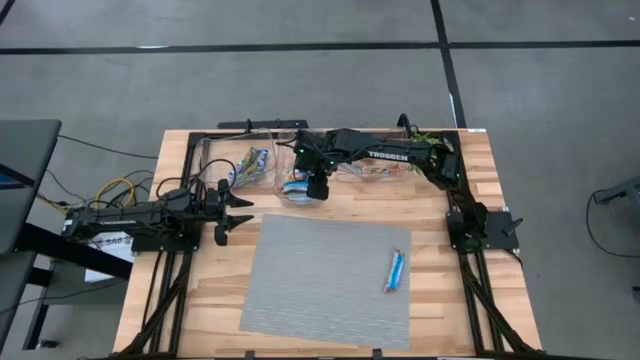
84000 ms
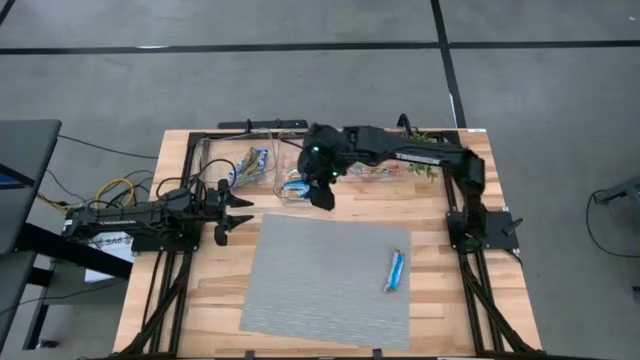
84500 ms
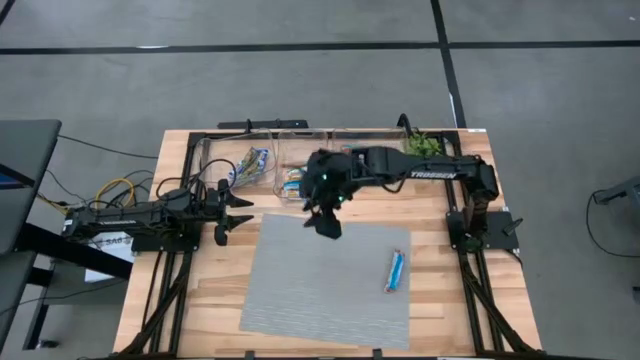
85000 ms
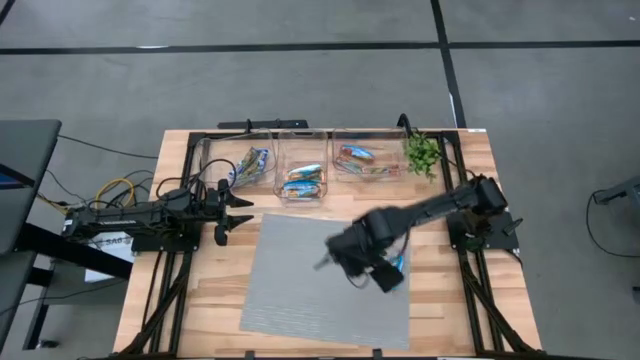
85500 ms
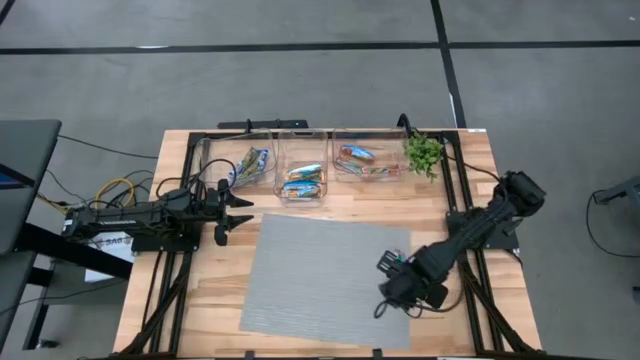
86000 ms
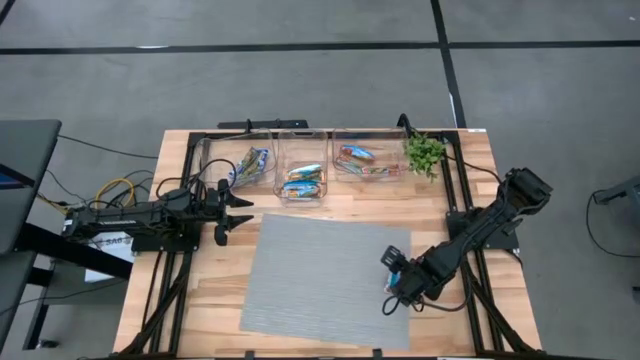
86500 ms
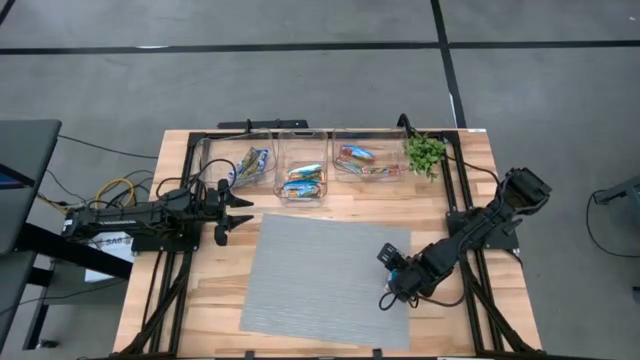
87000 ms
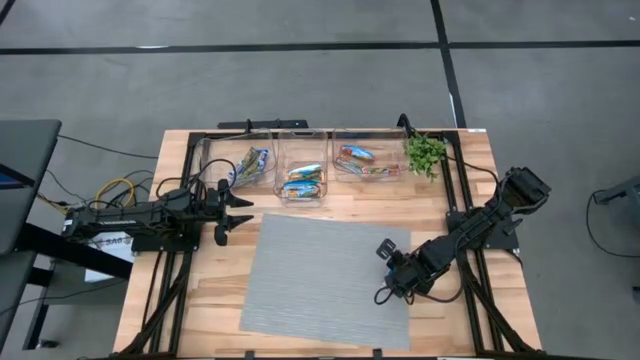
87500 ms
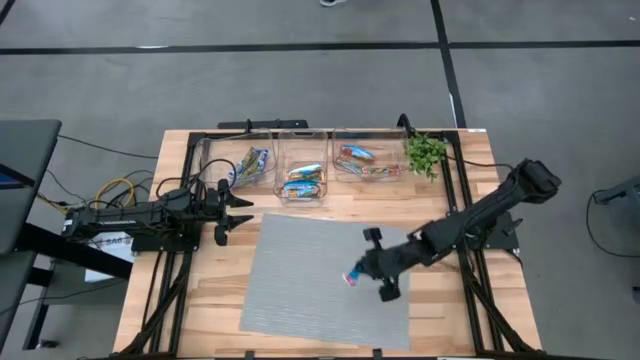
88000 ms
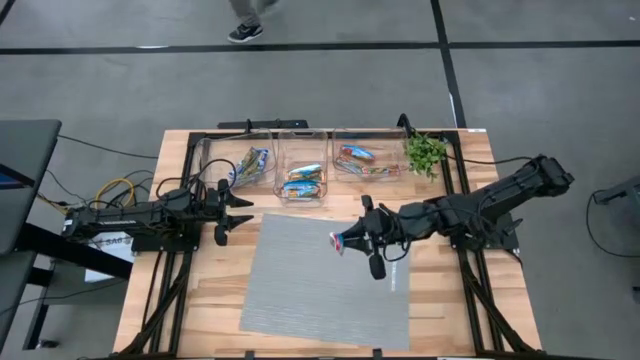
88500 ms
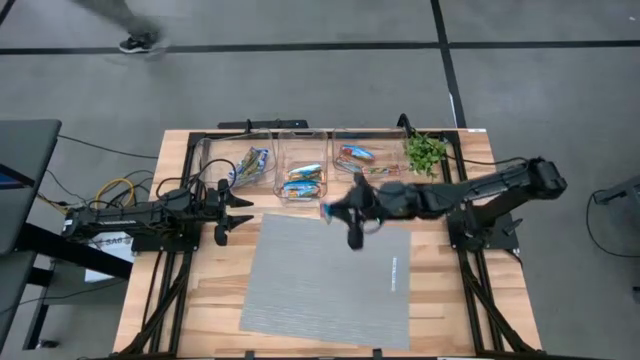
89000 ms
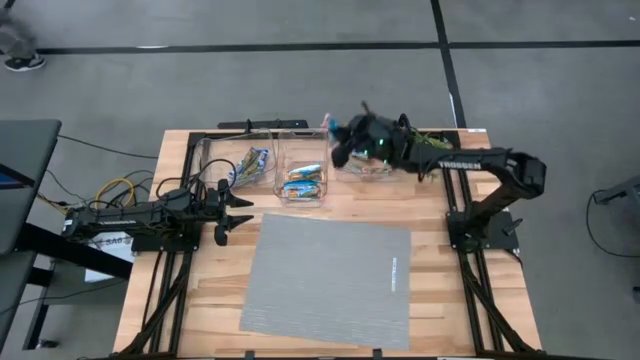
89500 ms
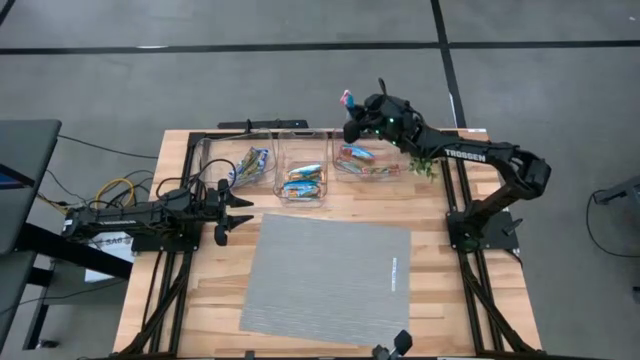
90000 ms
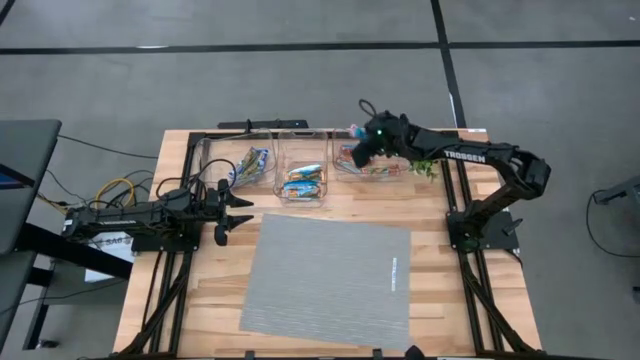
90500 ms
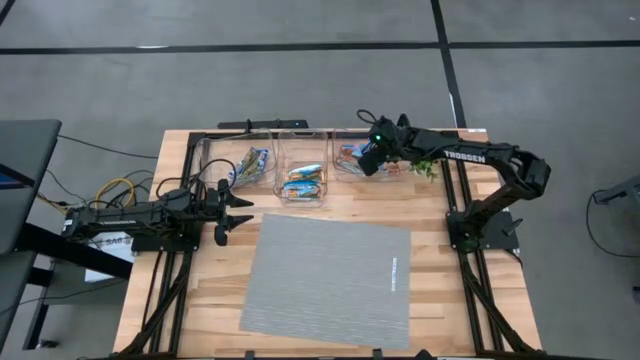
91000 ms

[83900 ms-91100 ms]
Task: Pick and place Granola Bars by type
Put the red granola bar into the right transparent bin

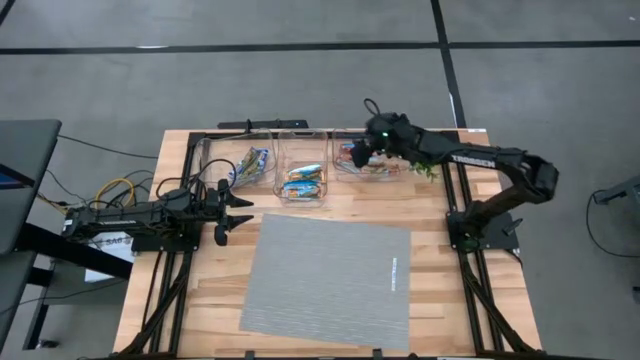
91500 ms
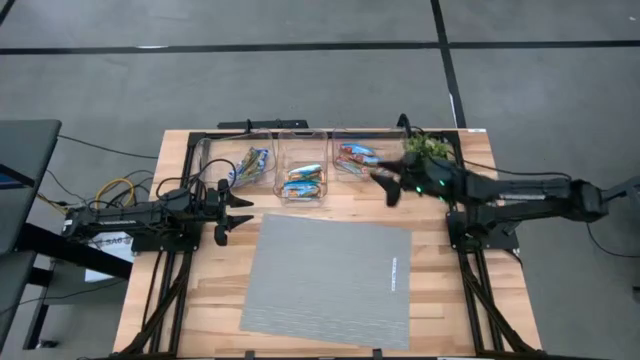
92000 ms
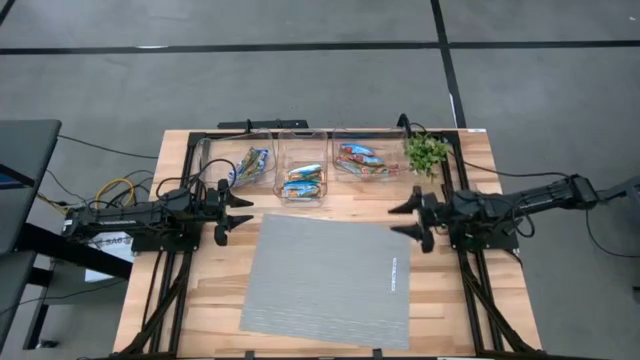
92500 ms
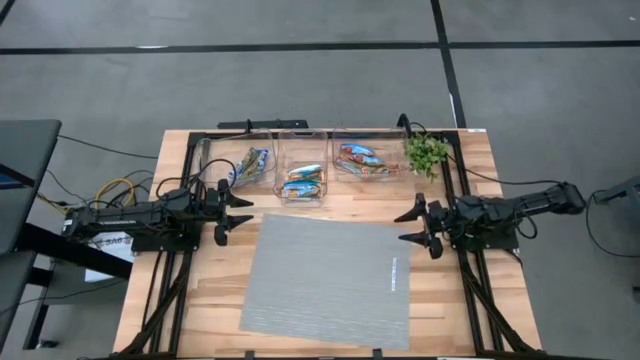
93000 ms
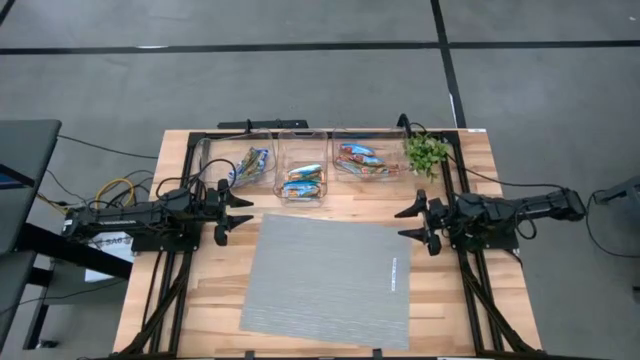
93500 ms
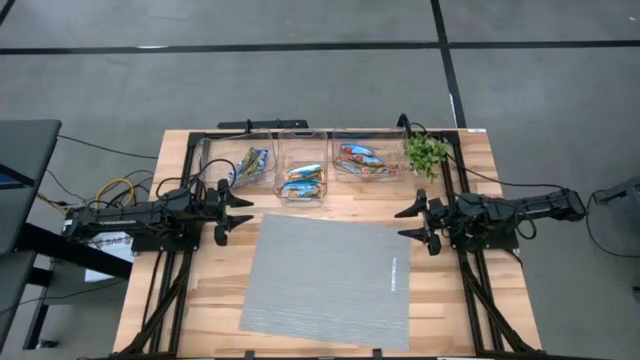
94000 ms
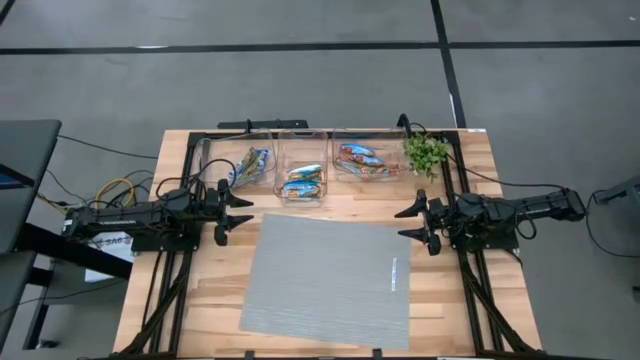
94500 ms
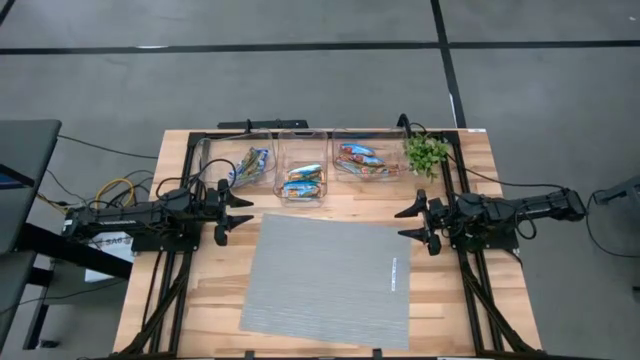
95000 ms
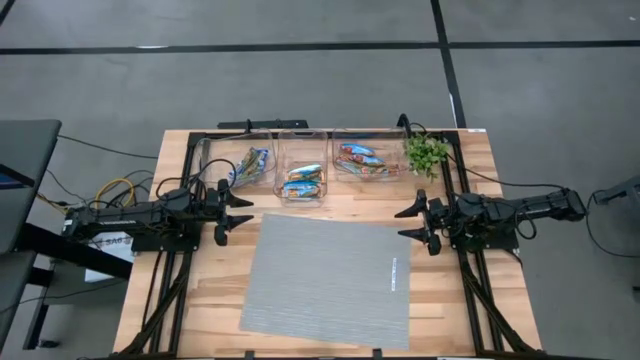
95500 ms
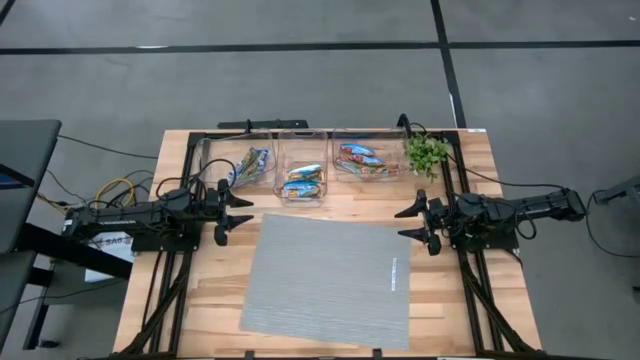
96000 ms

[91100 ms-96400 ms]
Return to Home Position

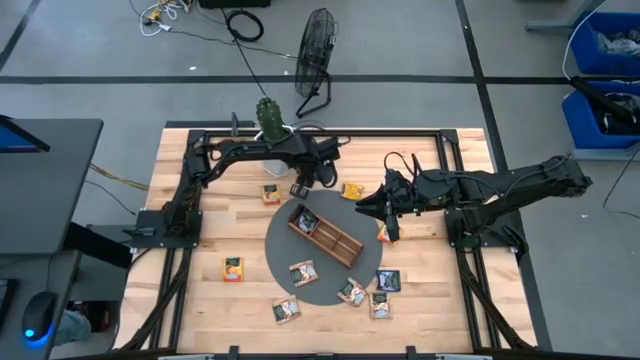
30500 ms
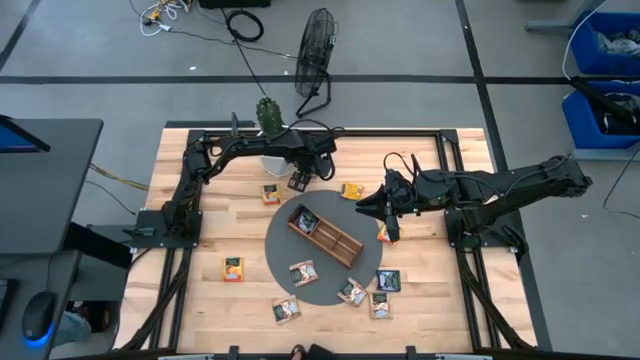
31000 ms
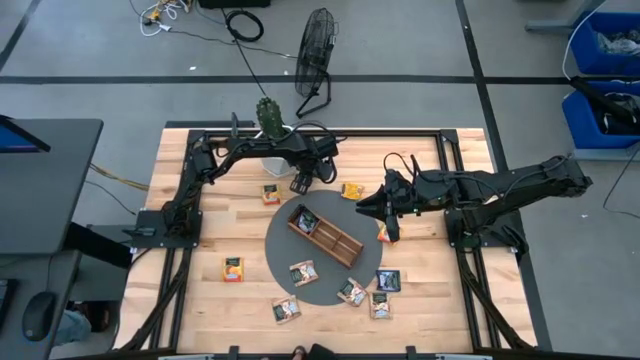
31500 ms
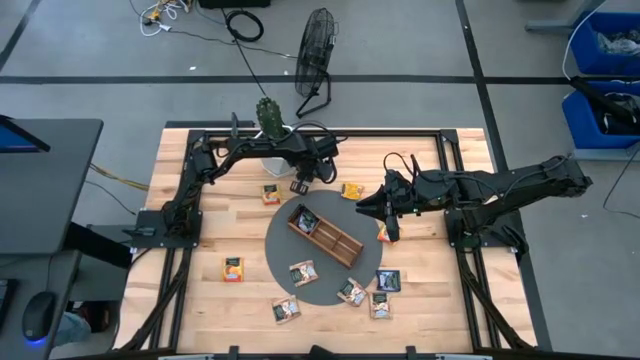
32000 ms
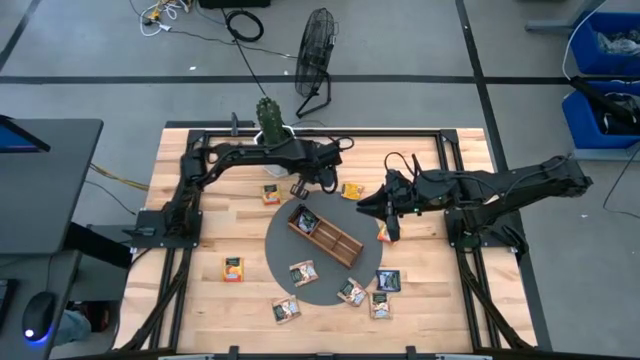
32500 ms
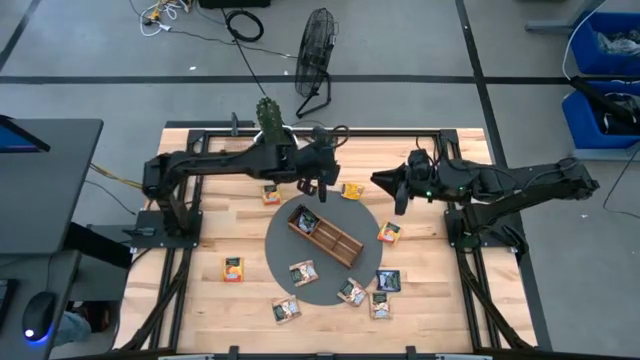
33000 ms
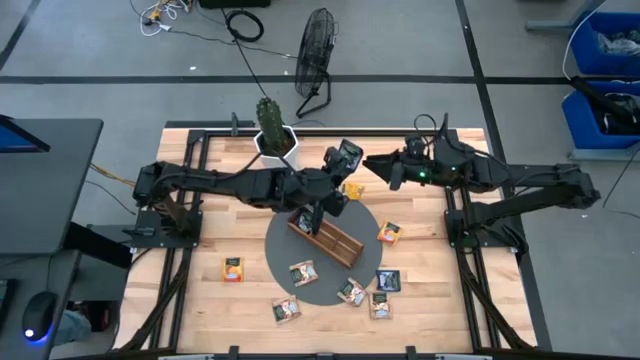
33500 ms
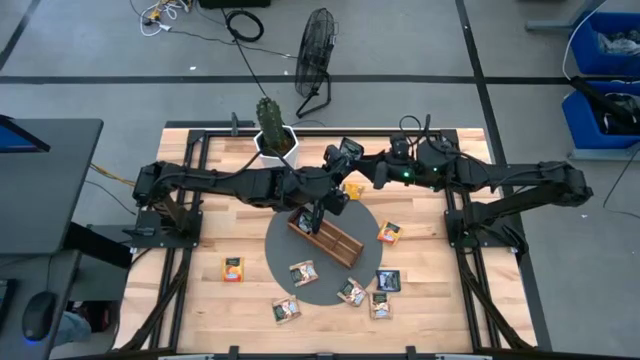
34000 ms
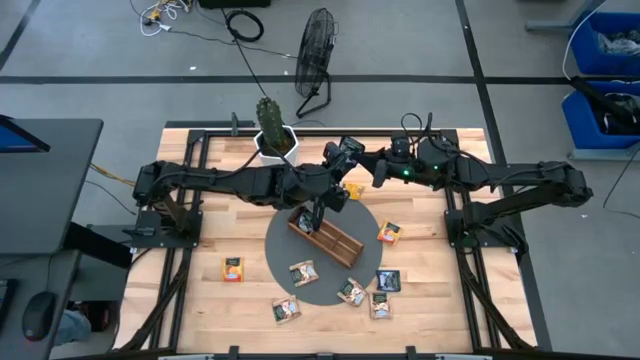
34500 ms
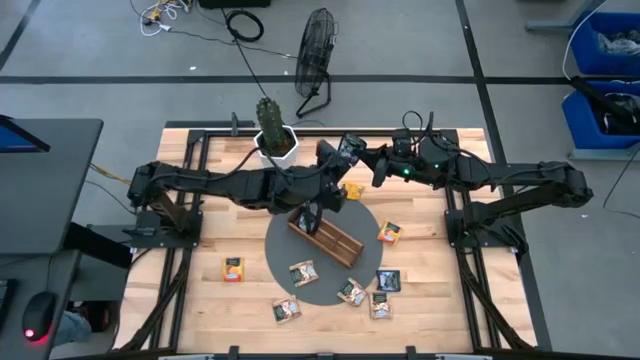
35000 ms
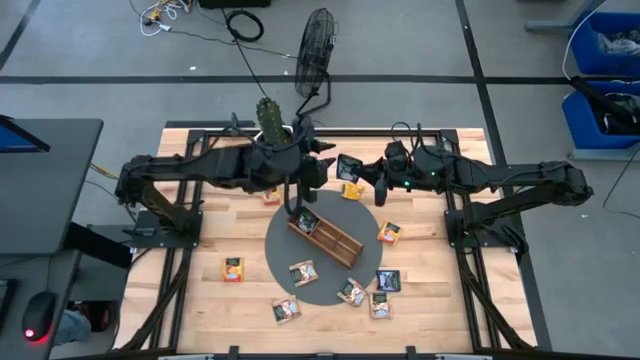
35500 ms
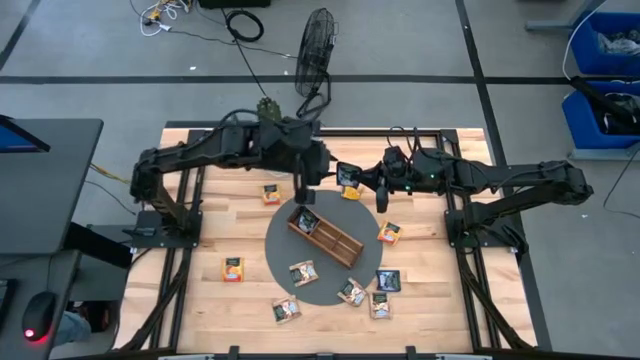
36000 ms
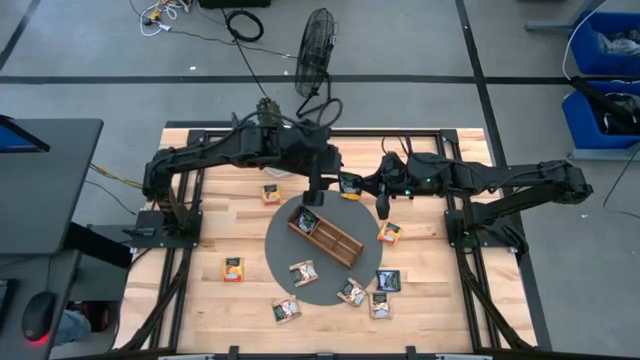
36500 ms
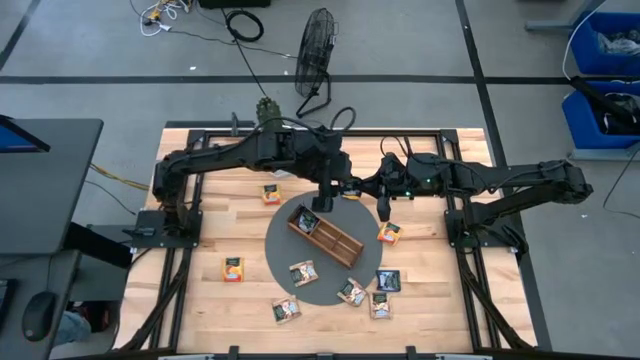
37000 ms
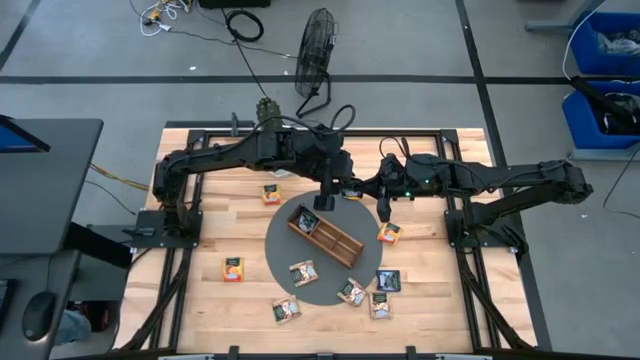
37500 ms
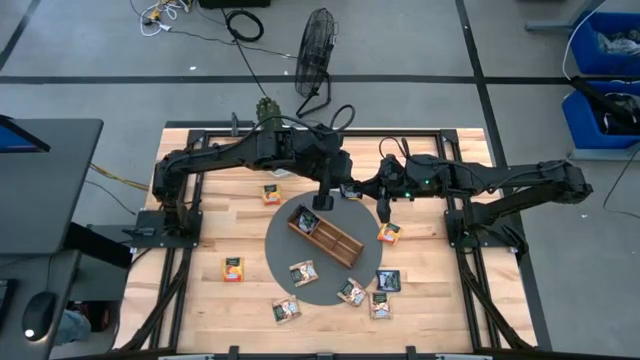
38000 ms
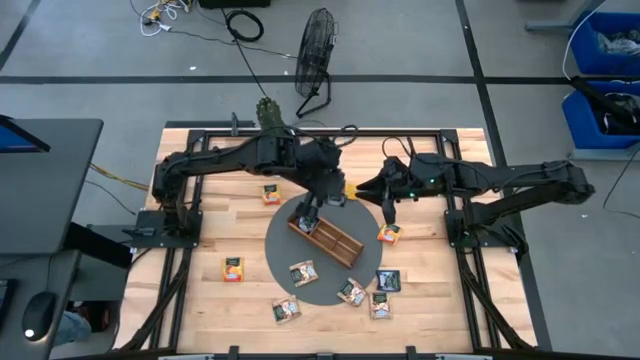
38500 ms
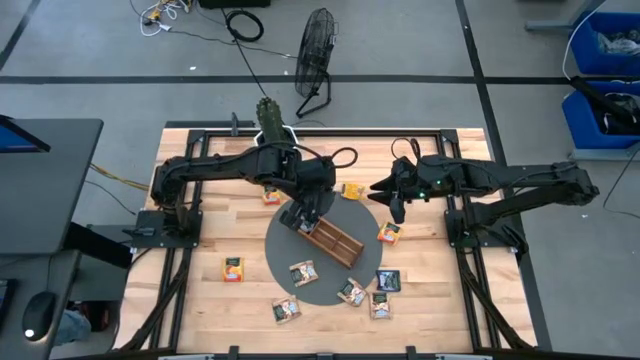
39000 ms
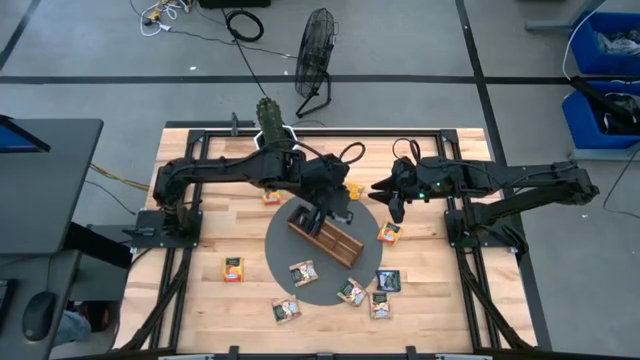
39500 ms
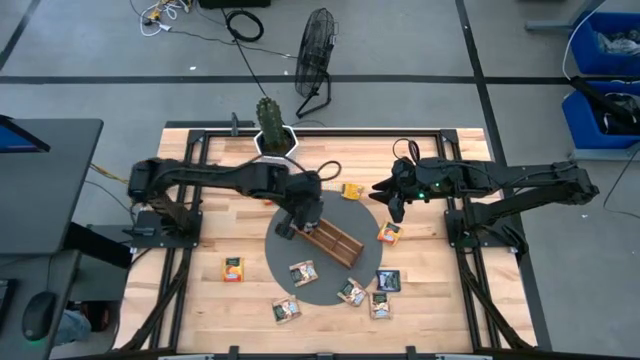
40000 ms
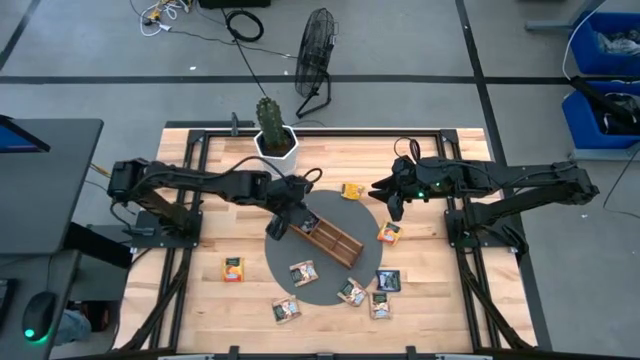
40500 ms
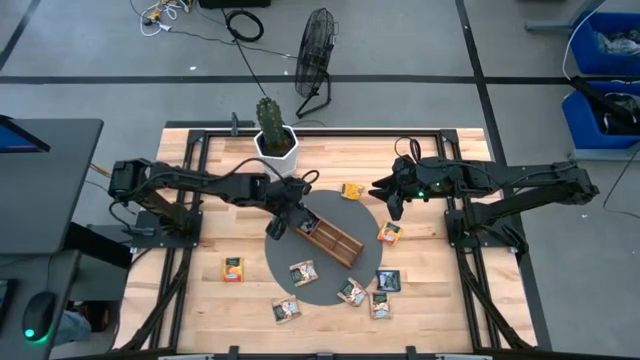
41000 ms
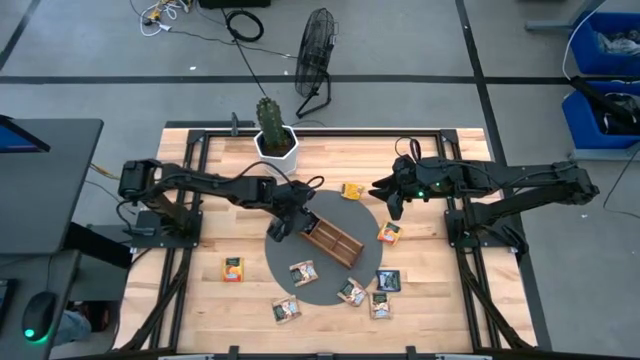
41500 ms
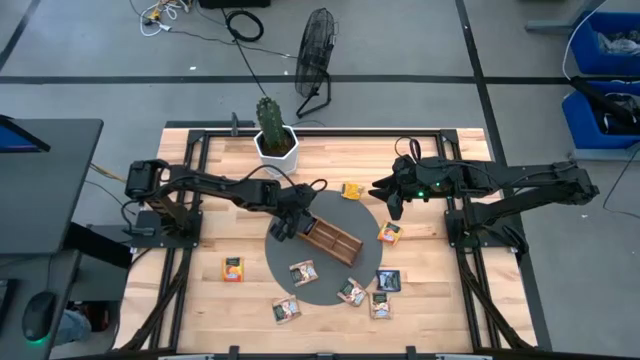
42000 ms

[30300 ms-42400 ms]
Task: Pick & Place Tea
Put the purple tea bag into the left section of the wooden organizer
